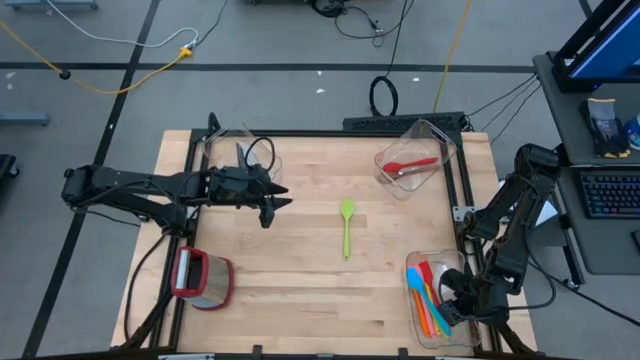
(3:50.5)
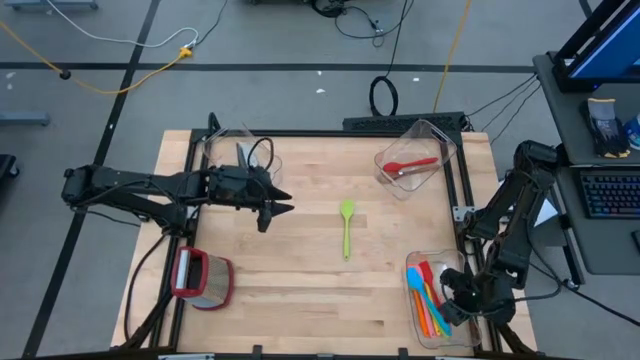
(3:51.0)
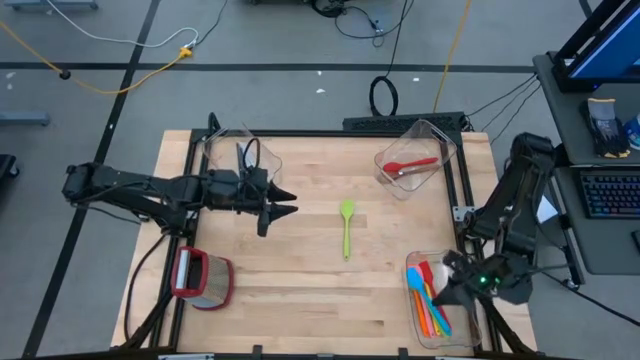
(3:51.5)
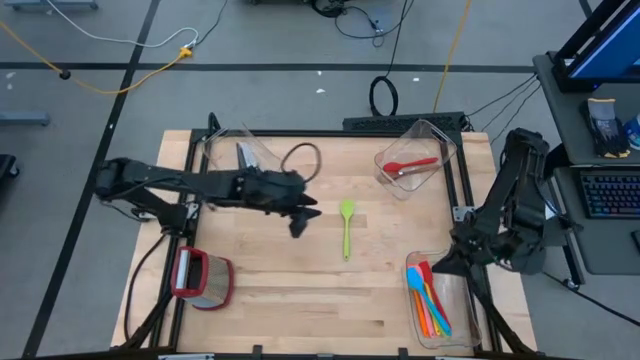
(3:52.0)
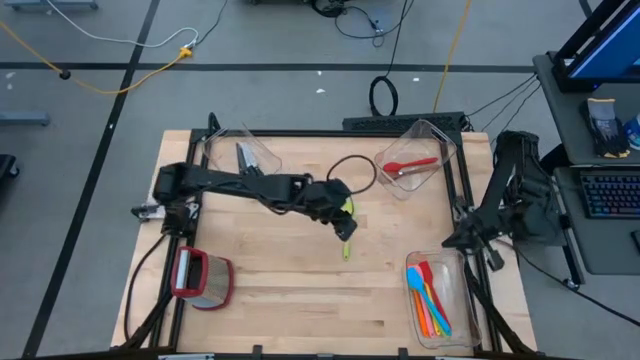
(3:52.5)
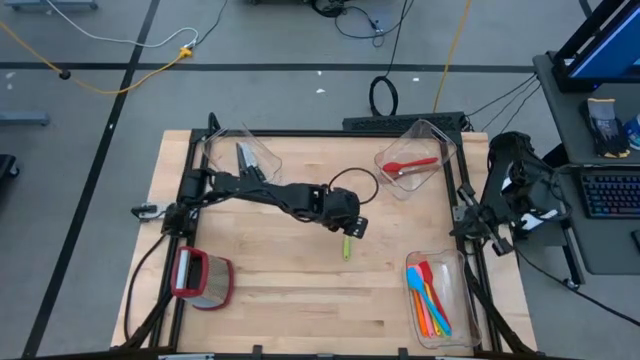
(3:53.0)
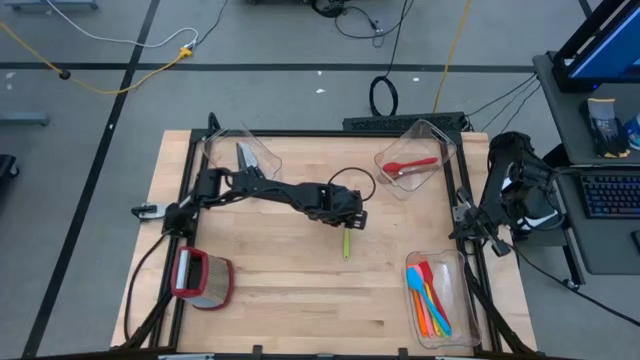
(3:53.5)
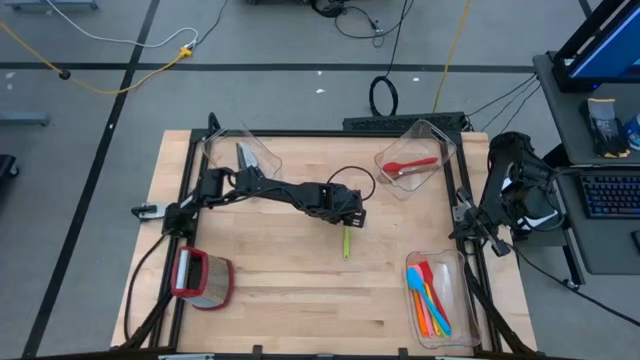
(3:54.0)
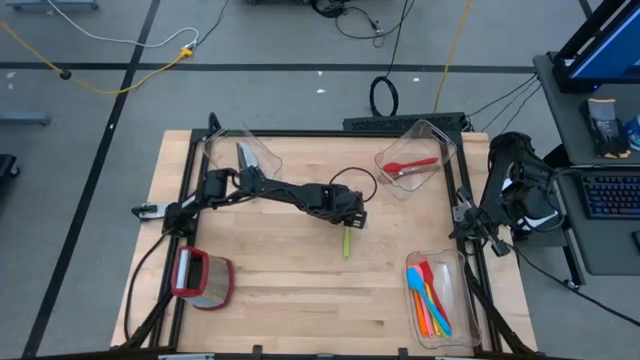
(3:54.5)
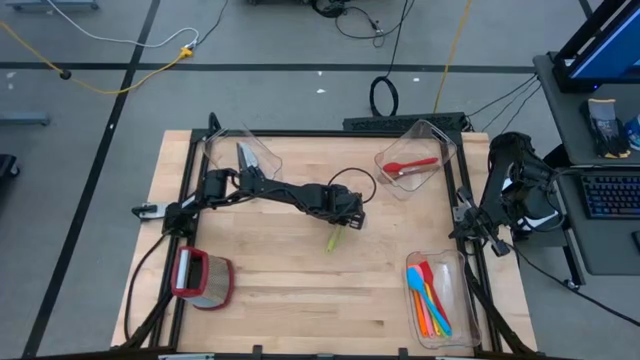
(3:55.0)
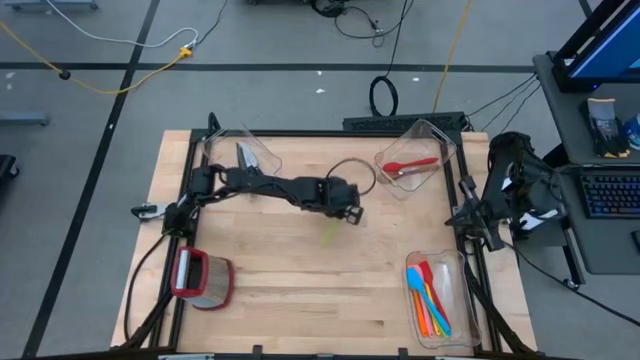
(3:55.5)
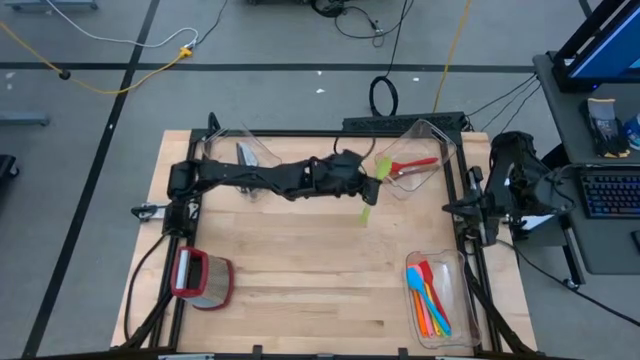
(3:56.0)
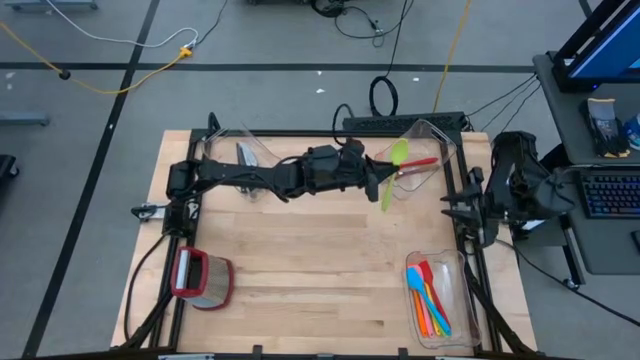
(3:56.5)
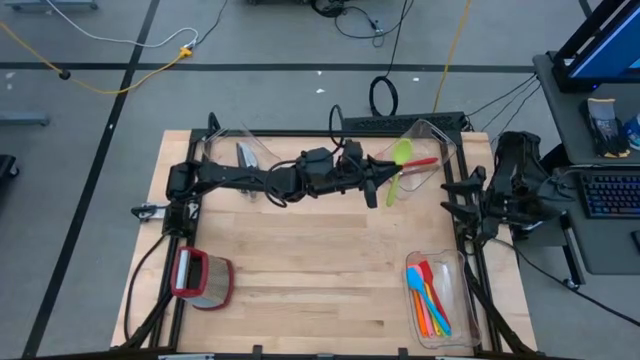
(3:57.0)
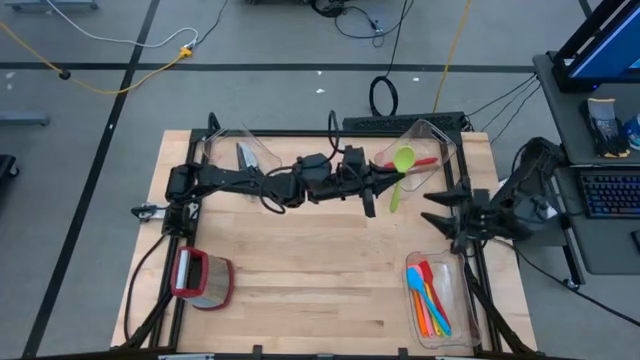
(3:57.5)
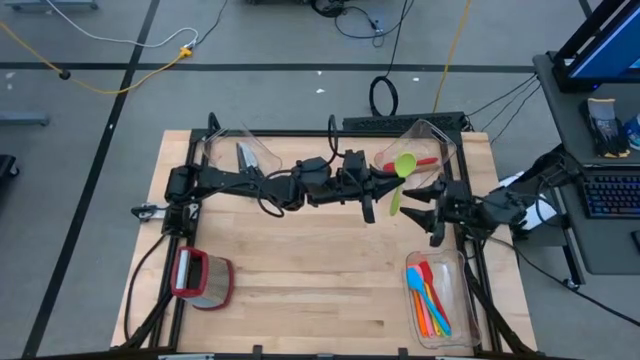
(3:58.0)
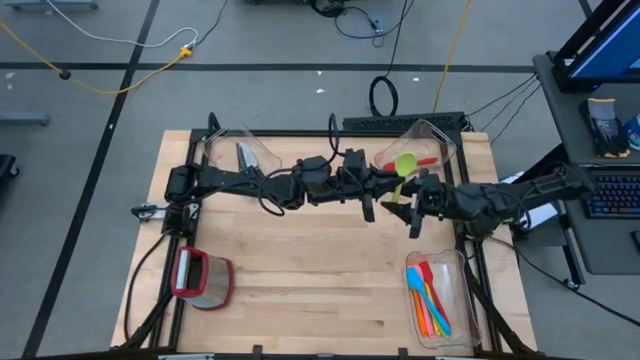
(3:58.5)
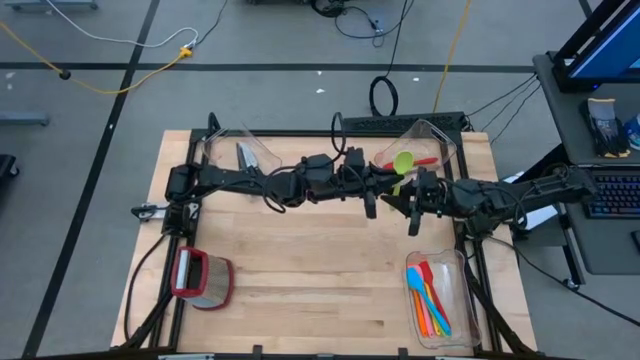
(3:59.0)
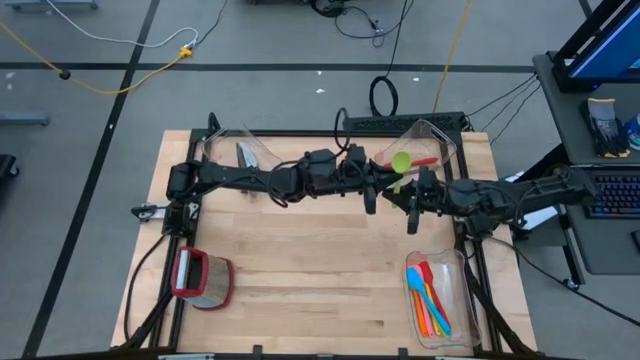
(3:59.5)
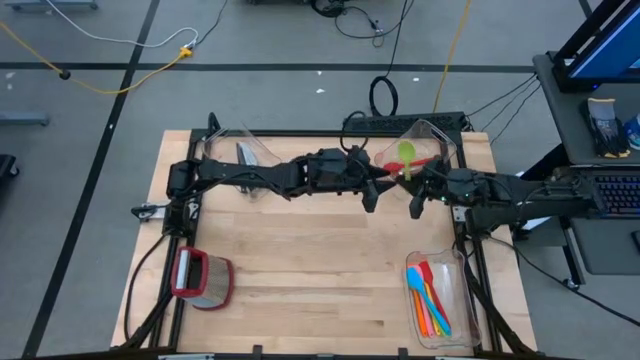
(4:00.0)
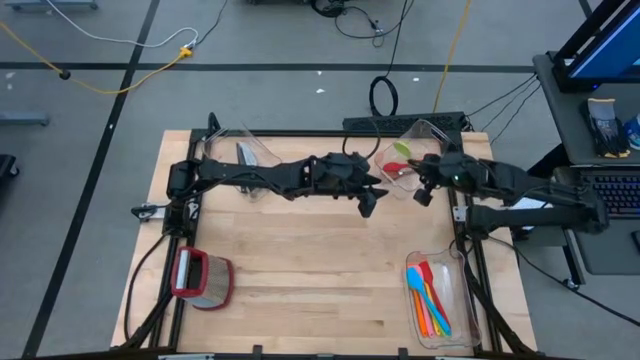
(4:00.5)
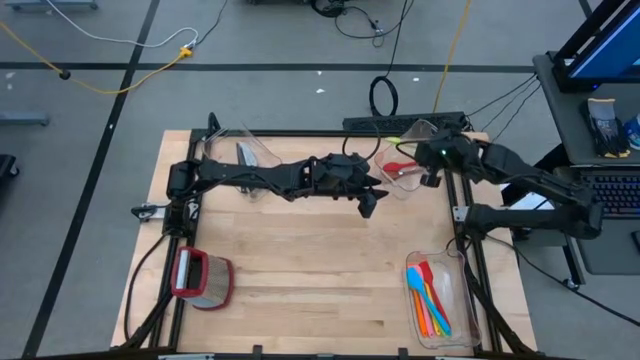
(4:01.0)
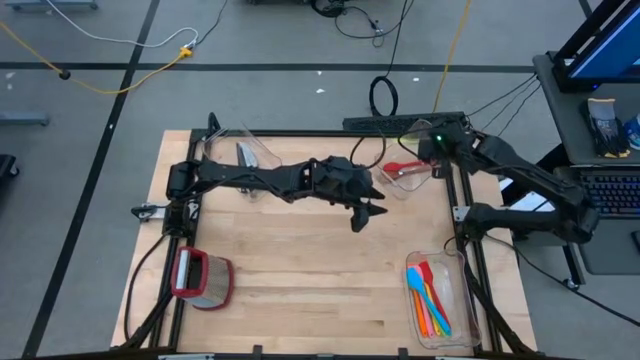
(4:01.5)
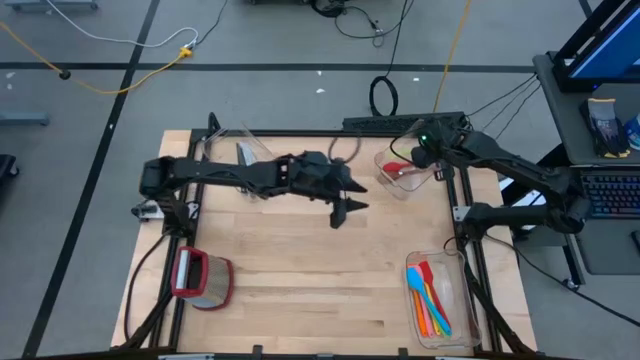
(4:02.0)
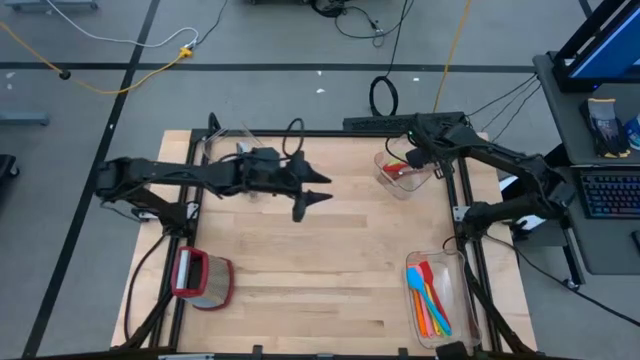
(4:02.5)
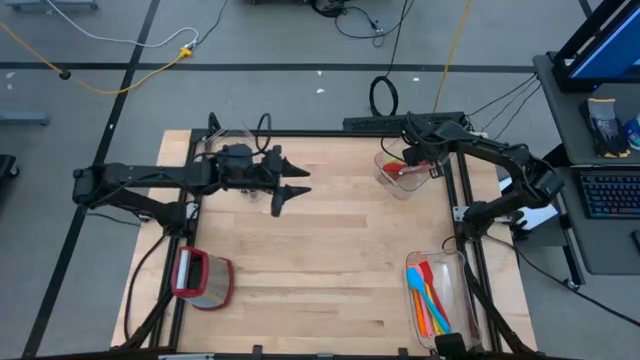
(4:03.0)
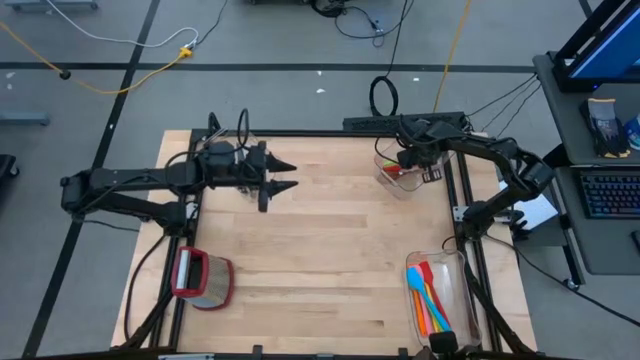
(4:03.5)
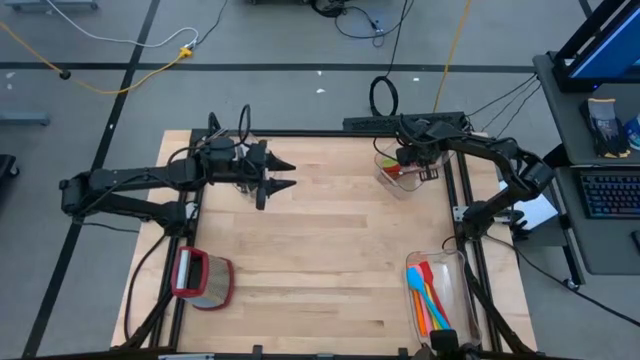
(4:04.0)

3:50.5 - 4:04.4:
Task: Pick & Place Kitchen Items
Put the green serving spoon into the top right transparent bin

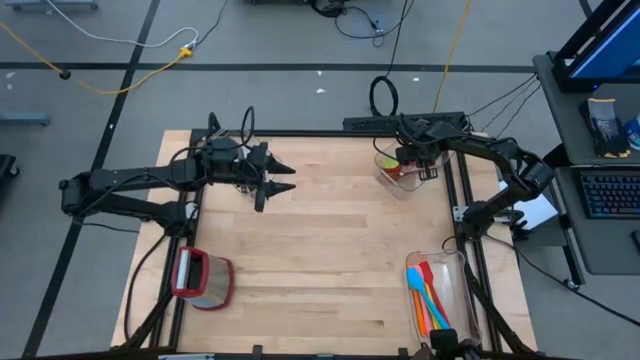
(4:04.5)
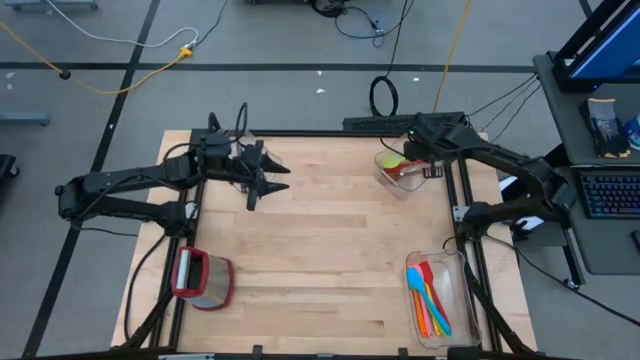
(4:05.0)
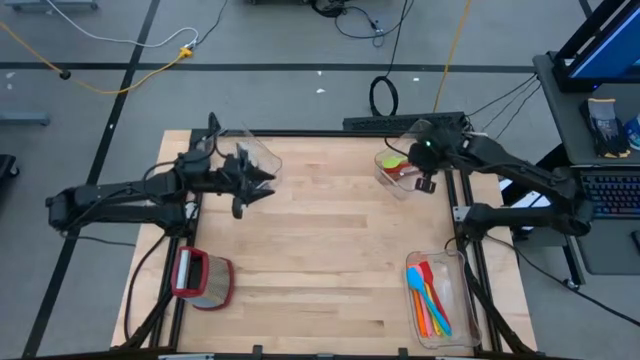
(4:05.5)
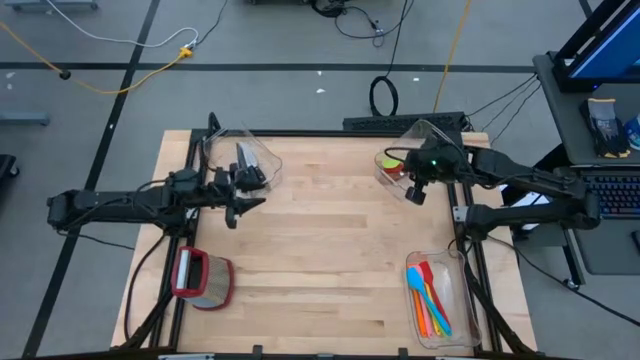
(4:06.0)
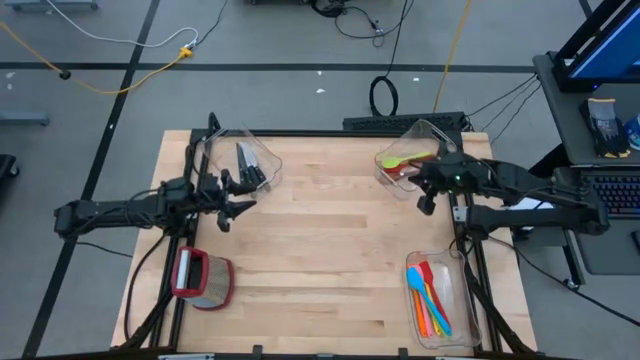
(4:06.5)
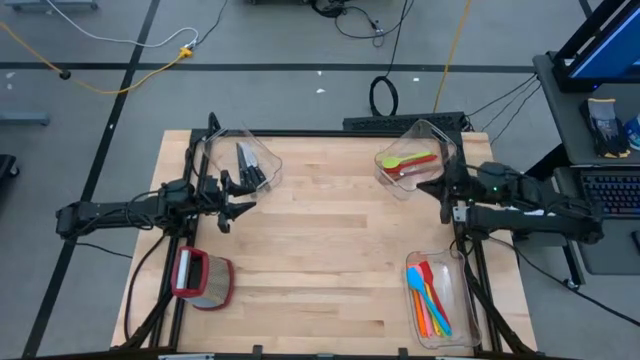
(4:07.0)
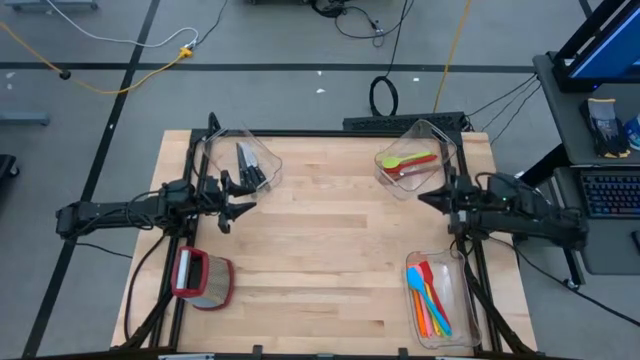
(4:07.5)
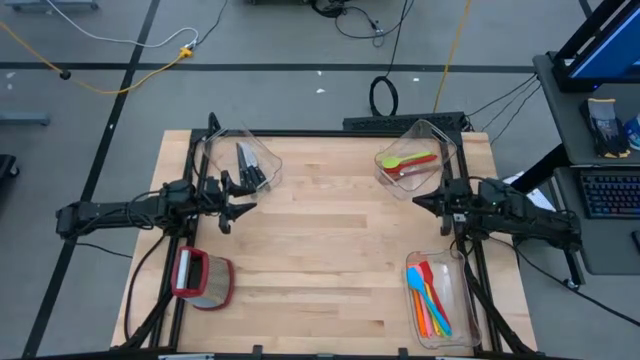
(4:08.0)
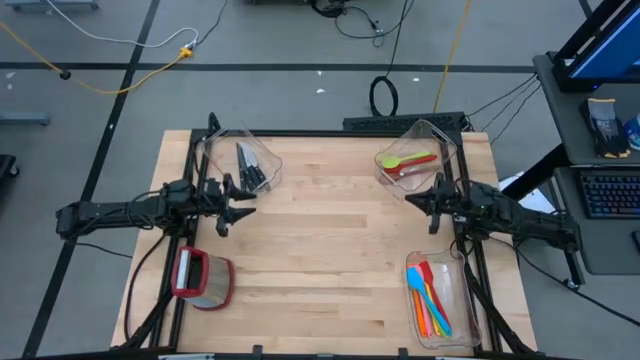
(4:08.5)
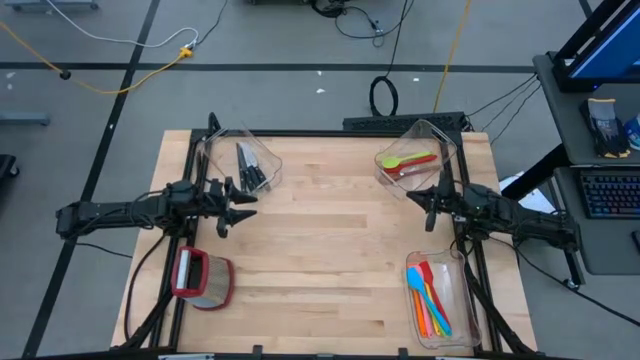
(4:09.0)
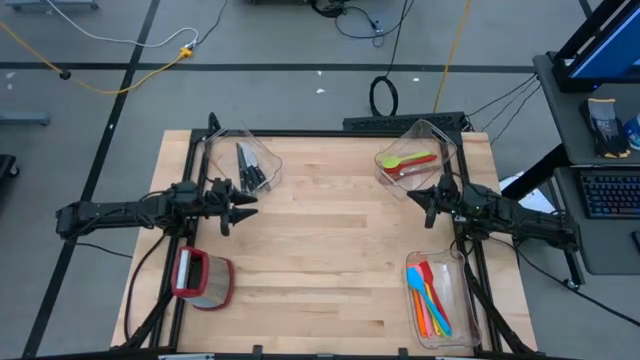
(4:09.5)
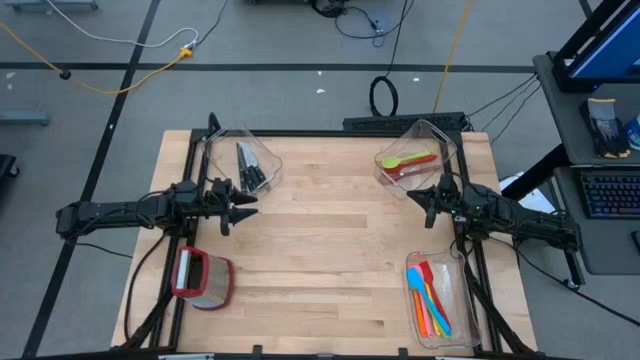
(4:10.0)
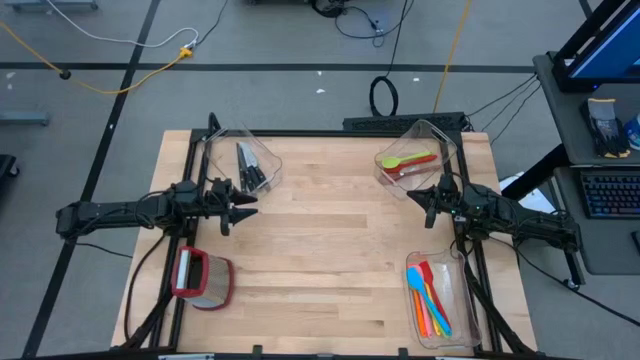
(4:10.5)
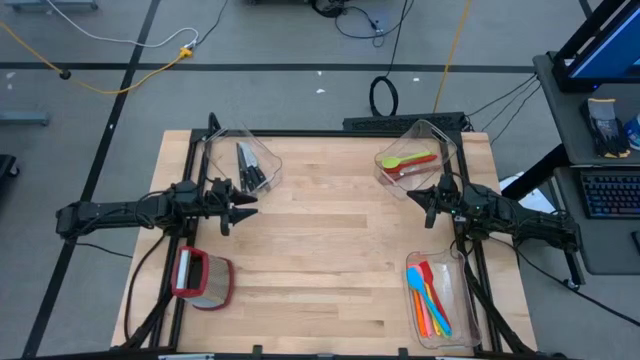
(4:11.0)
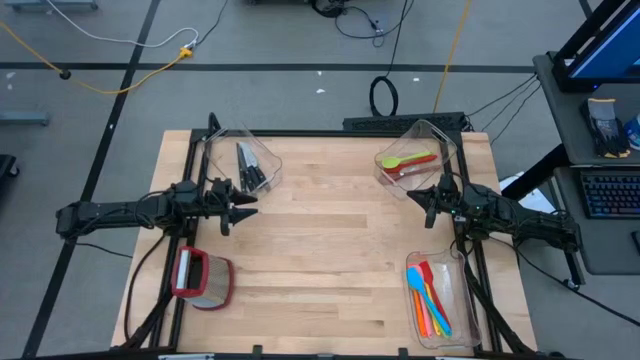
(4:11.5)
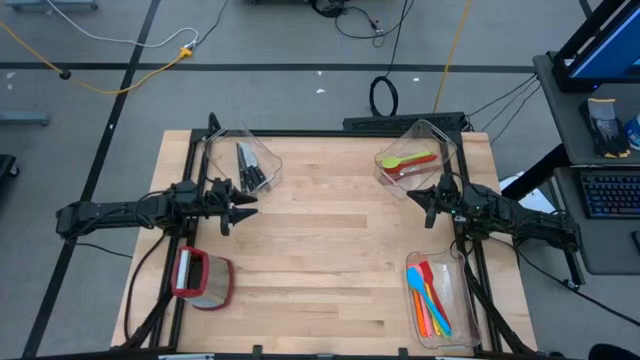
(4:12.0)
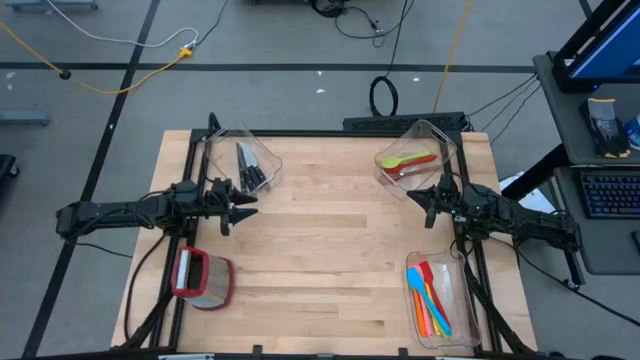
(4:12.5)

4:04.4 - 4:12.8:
Return To Home position
